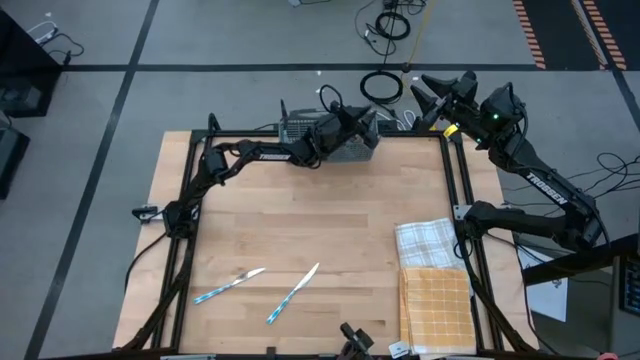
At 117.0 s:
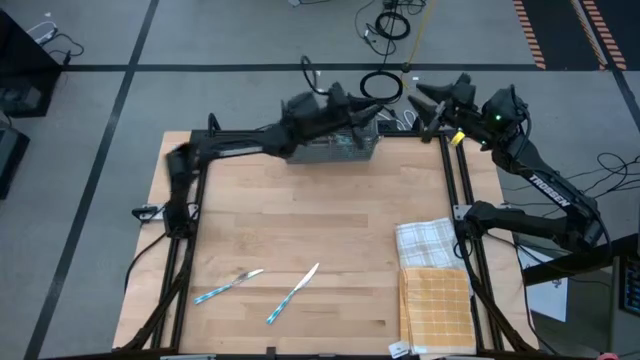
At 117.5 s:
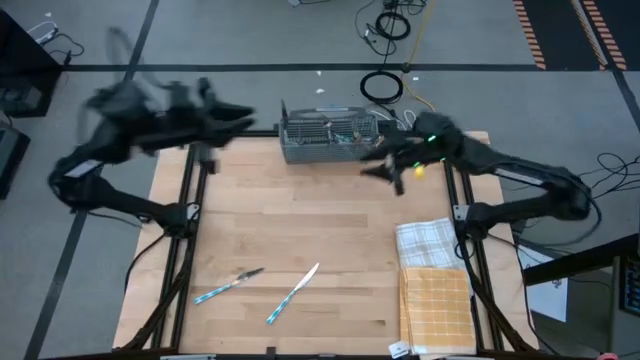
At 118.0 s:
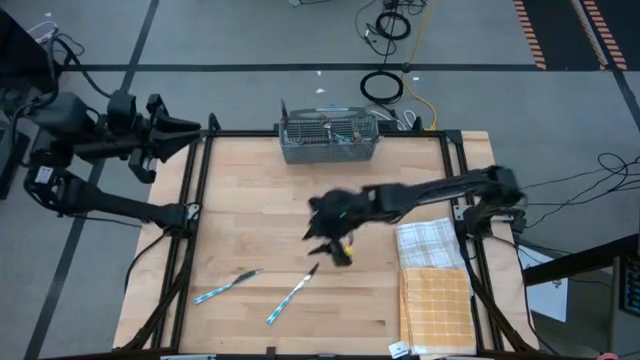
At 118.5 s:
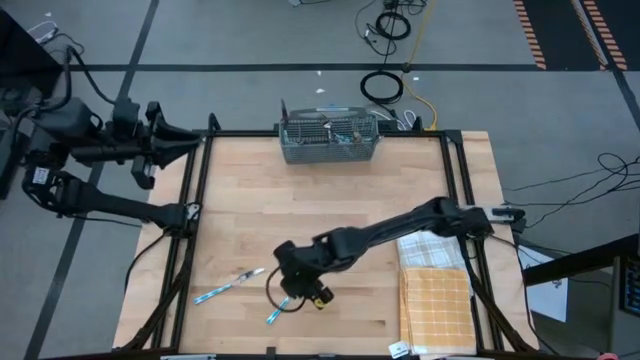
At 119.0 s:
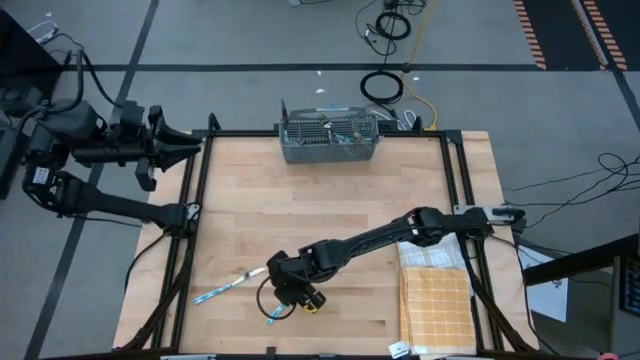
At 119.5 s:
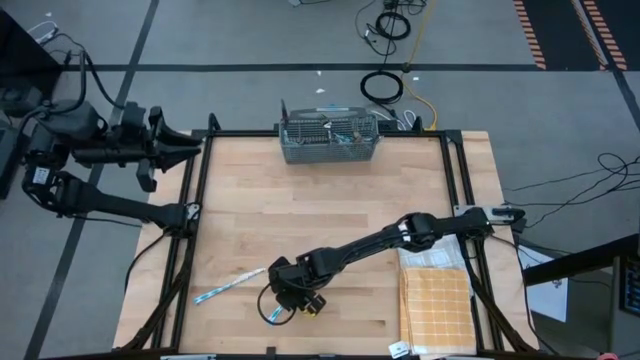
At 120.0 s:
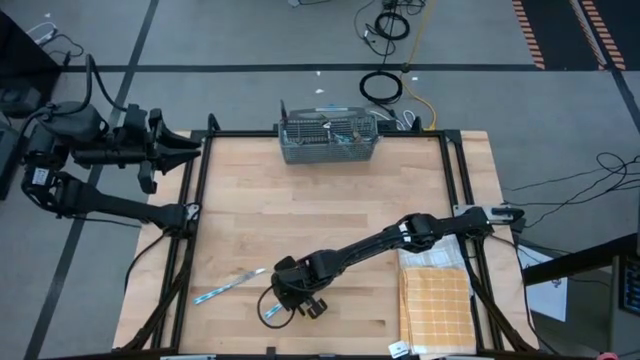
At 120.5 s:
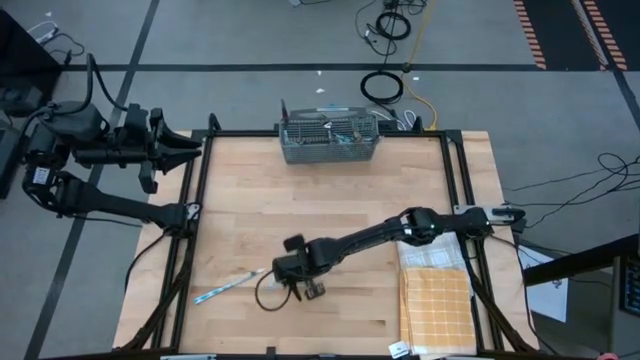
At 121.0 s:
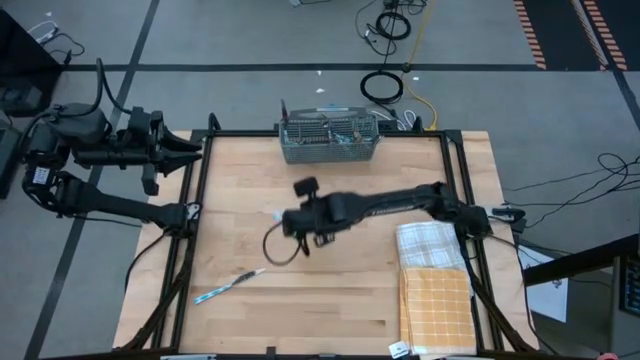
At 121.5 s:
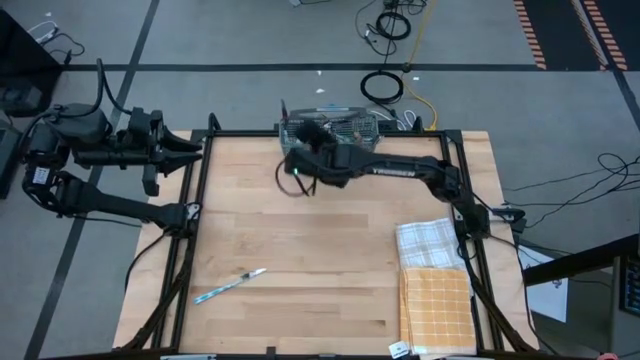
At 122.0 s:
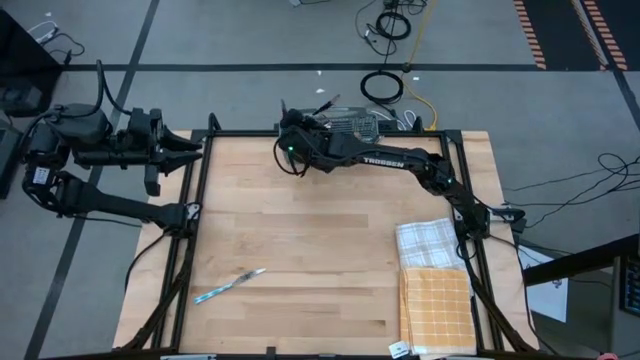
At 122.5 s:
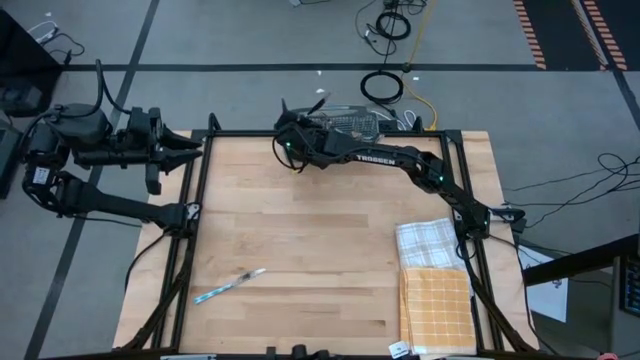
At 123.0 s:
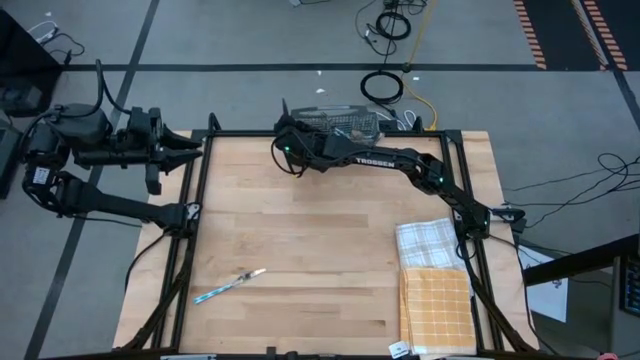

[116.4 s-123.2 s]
Task: Sort silverware
Put the table knife into the silverware rack

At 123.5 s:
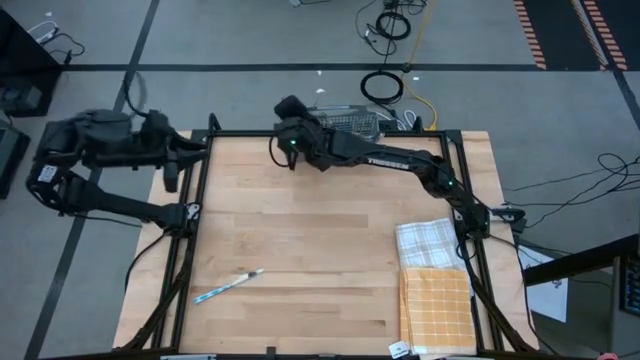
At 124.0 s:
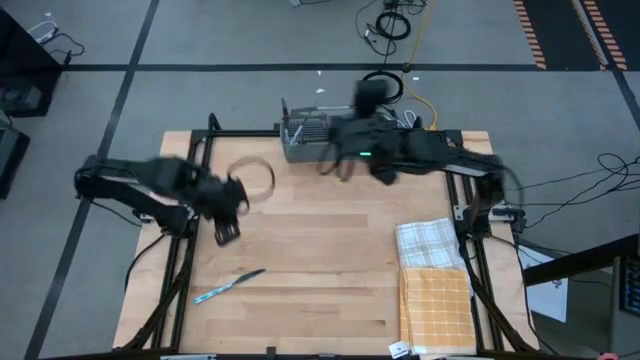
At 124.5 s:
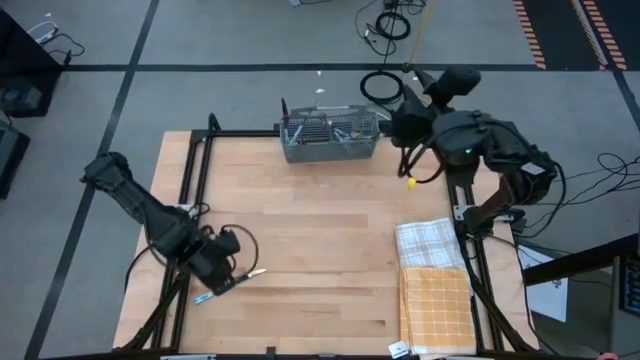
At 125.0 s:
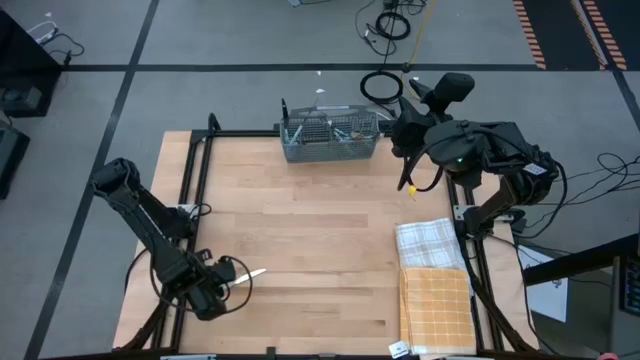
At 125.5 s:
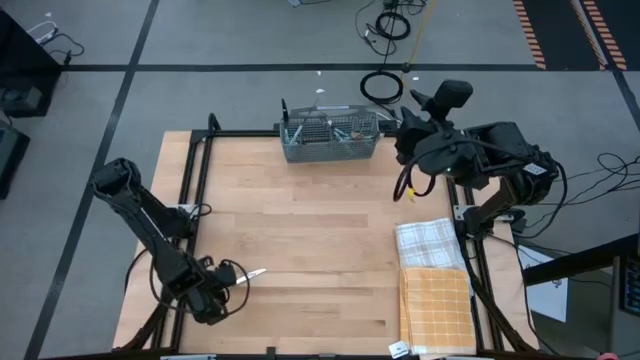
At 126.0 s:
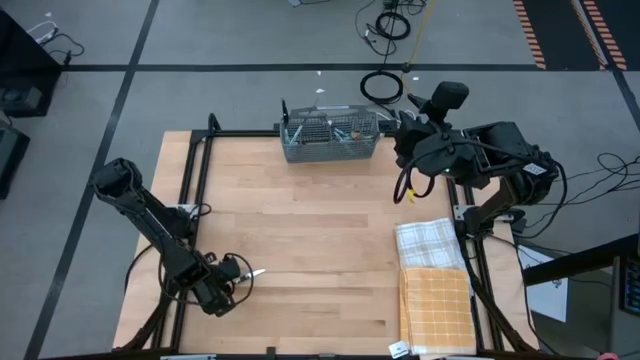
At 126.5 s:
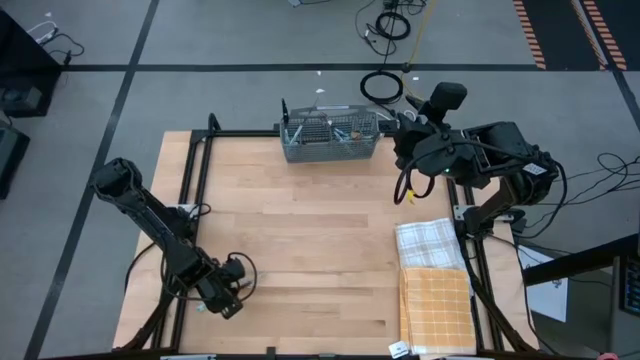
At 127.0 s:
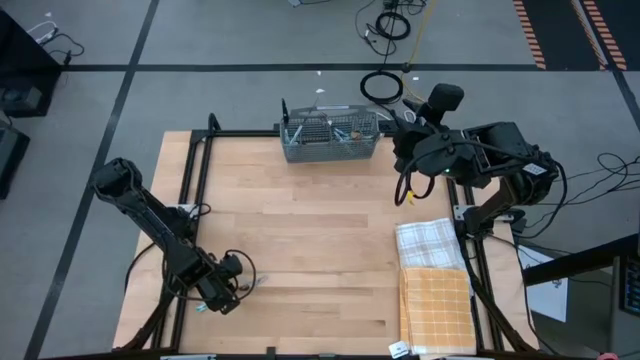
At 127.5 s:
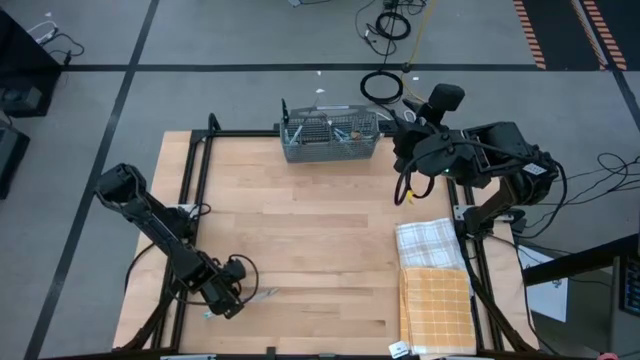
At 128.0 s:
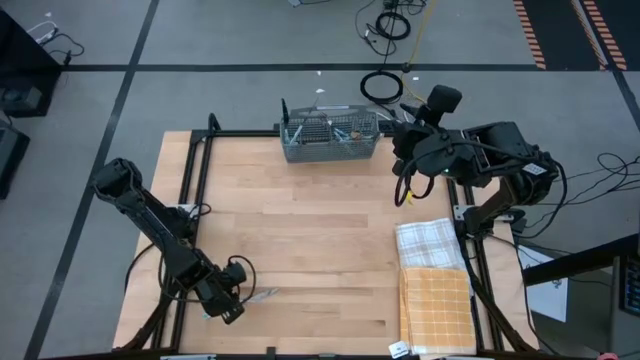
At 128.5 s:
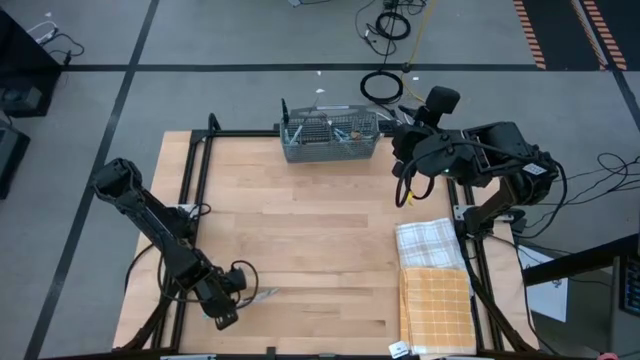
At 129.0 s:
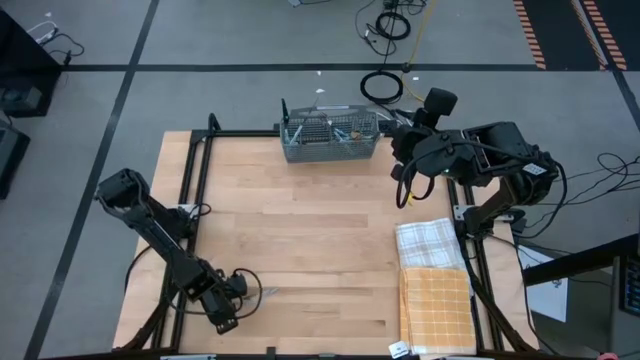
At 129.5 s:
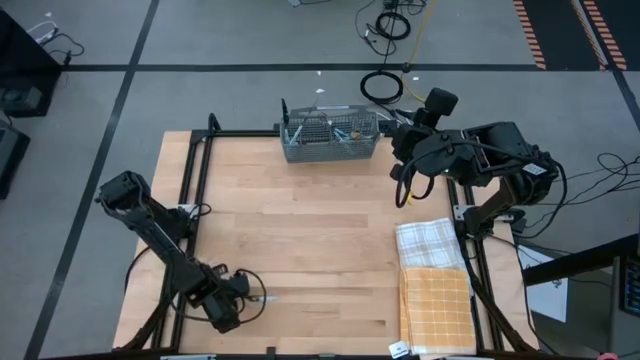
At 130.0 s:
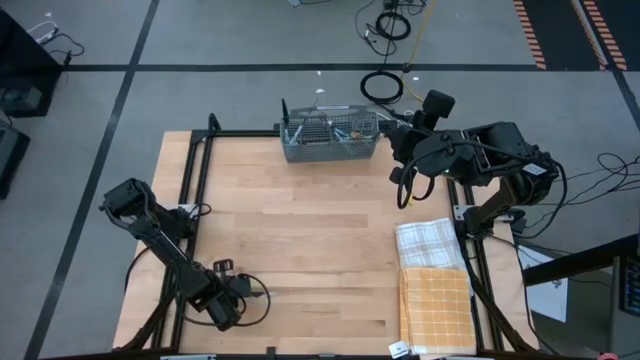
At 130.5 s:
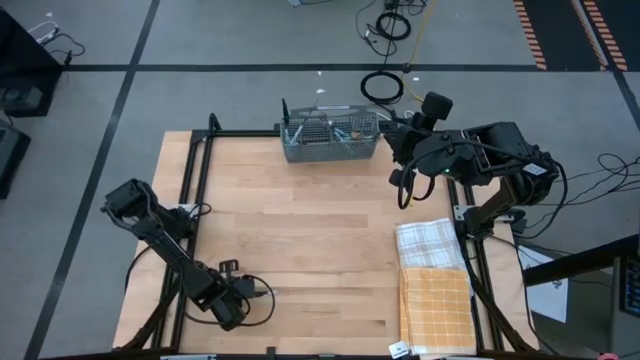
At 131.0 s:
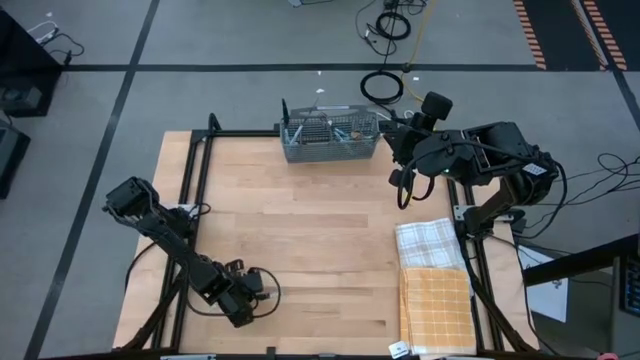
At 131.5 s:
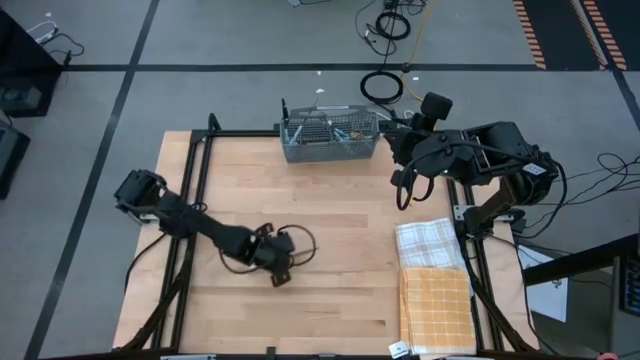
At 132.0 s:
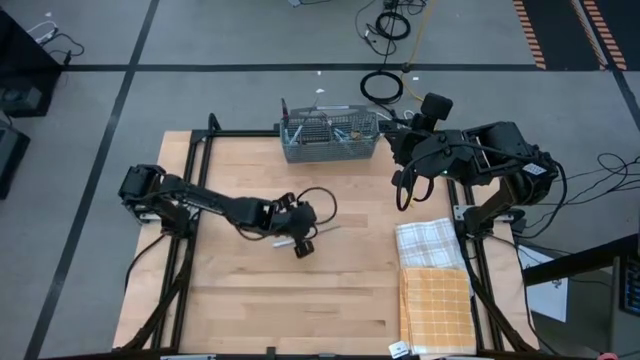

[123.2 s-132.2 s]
Put the table knife into the silverware rack

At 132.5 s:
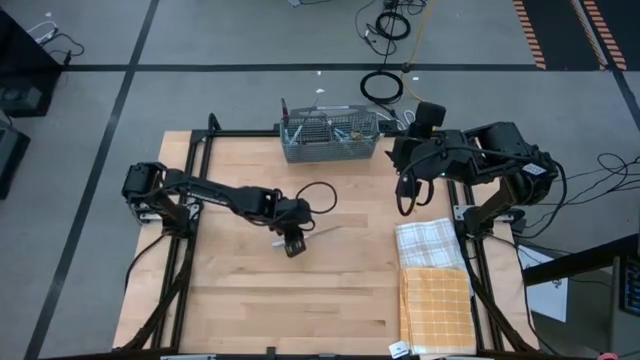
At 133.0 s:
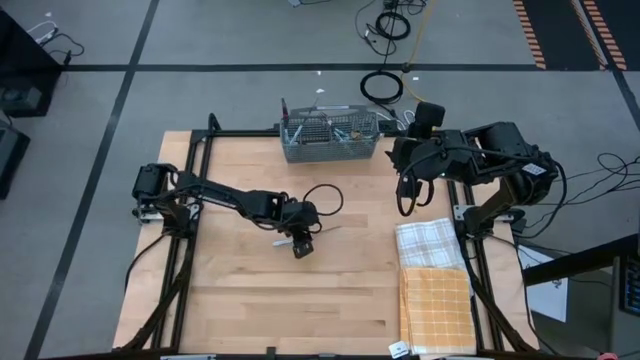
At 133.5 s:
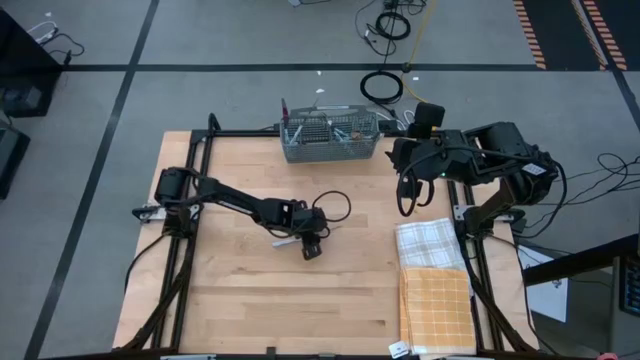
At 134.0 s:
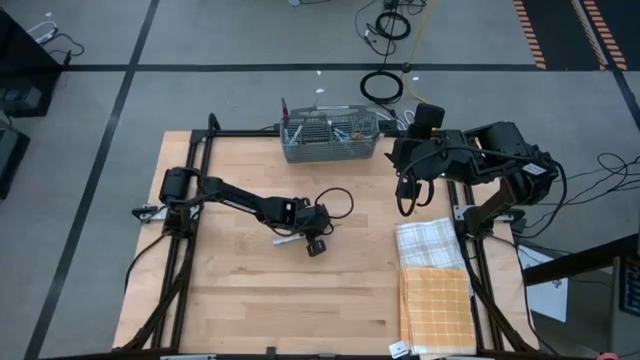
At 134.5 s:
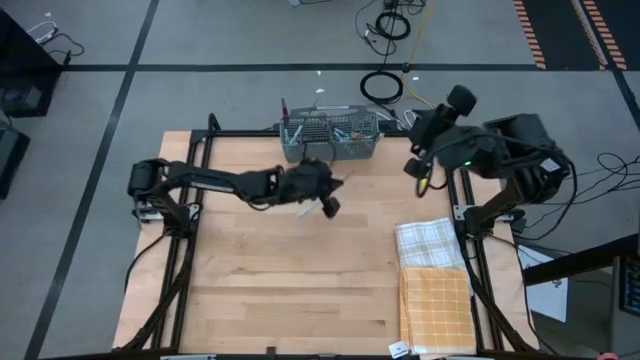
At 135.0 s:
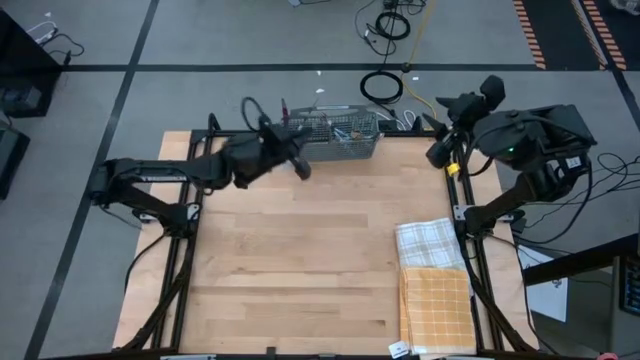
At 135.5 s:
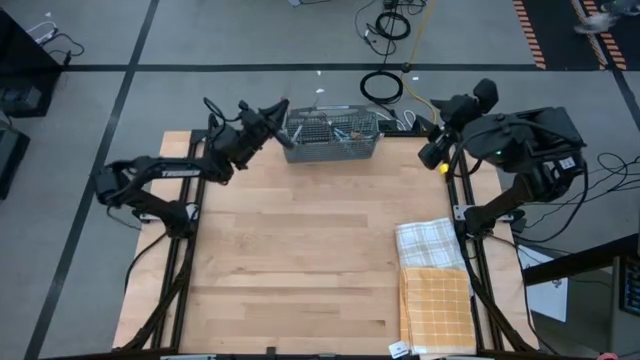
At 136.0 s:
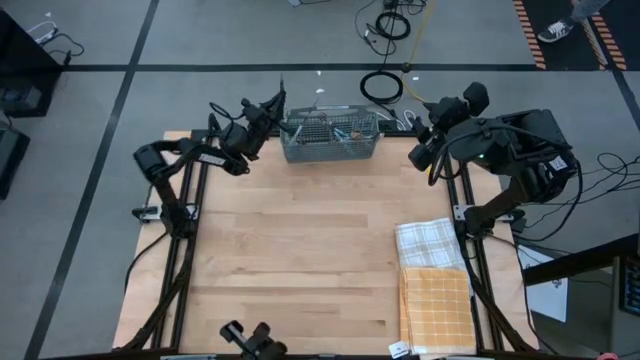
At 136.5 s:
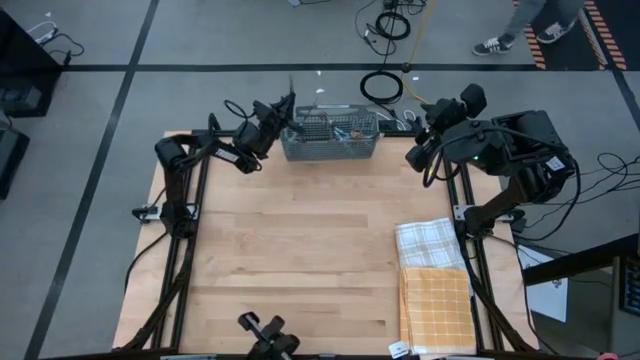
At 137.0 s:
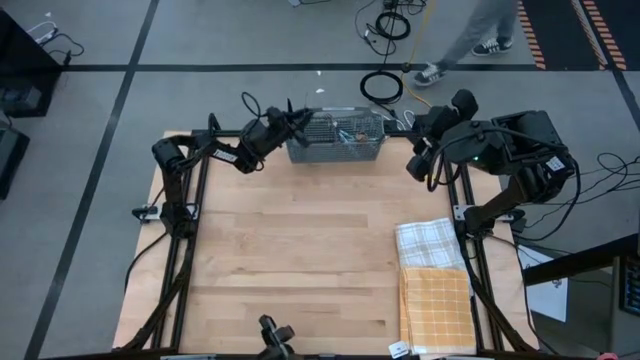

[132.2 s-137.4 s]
Put the table knife into the silverware rack
